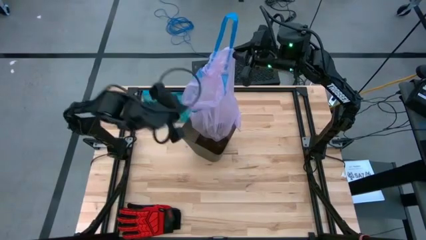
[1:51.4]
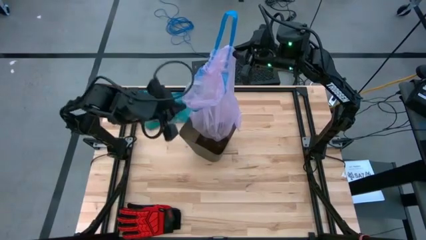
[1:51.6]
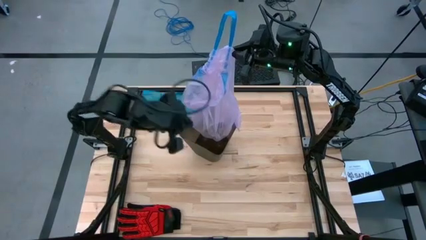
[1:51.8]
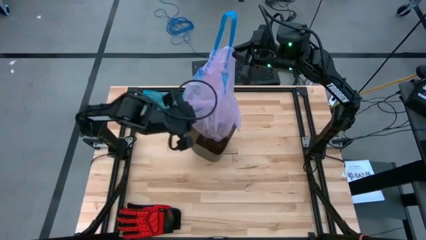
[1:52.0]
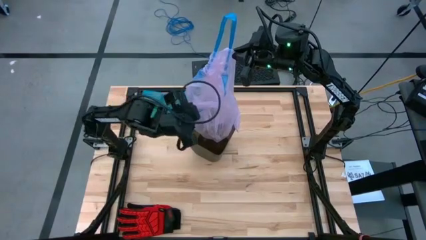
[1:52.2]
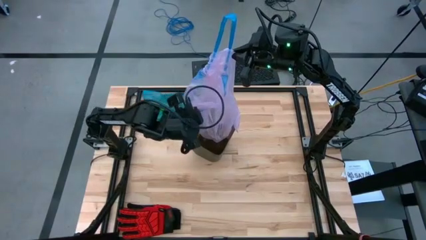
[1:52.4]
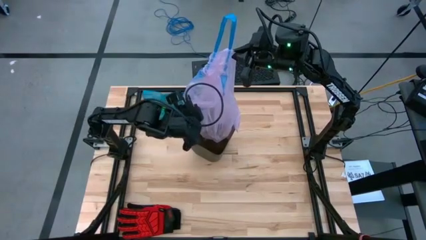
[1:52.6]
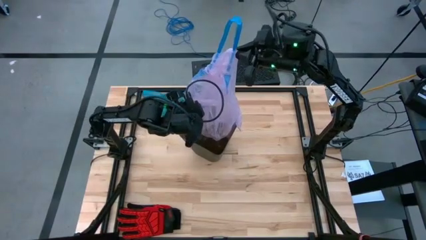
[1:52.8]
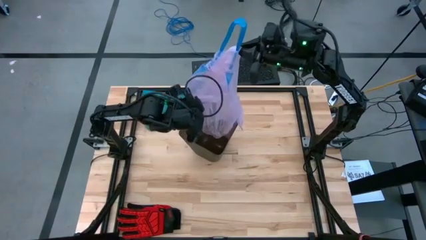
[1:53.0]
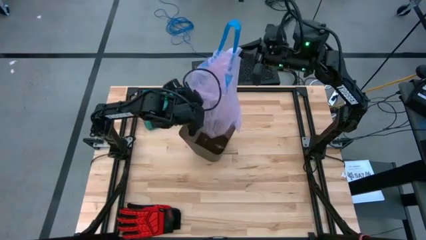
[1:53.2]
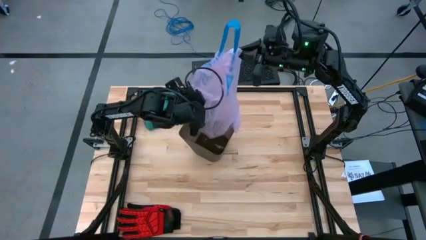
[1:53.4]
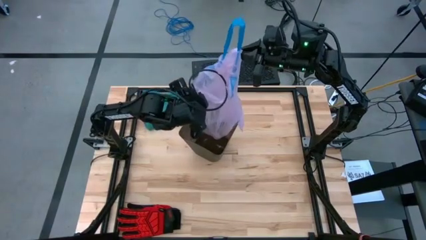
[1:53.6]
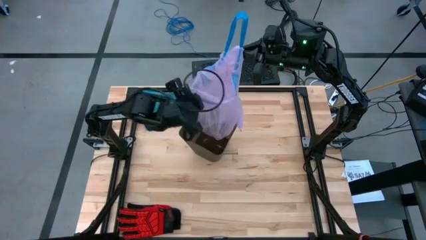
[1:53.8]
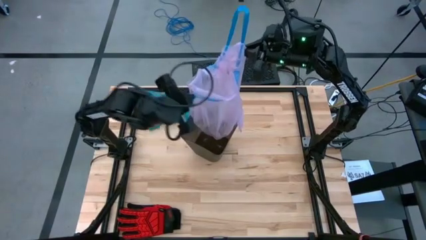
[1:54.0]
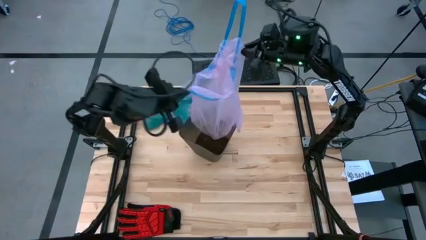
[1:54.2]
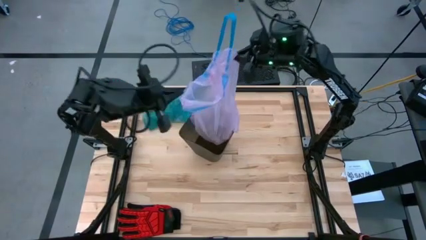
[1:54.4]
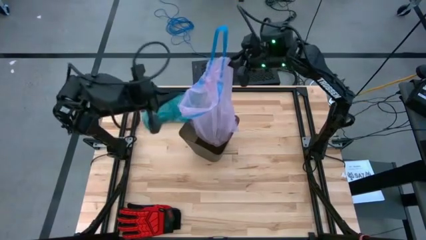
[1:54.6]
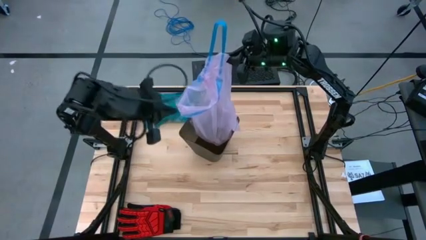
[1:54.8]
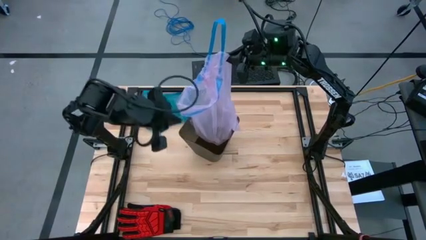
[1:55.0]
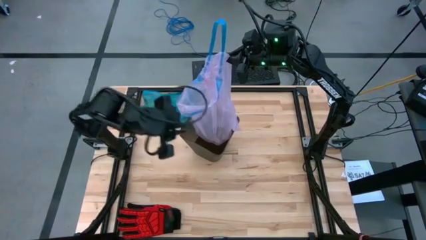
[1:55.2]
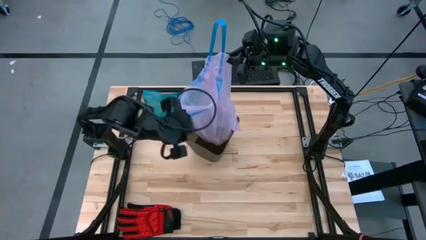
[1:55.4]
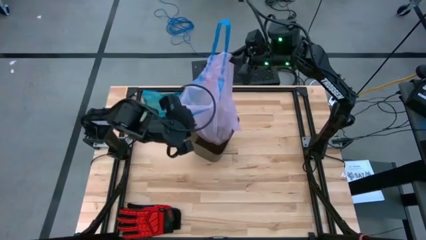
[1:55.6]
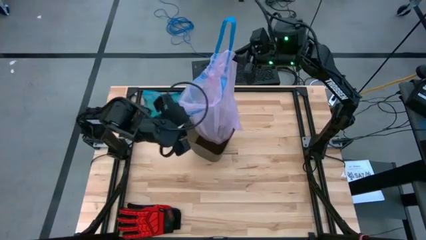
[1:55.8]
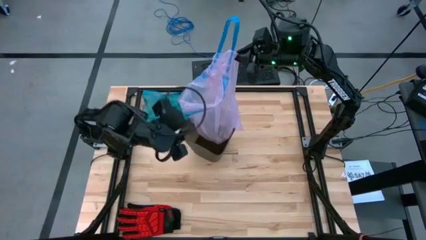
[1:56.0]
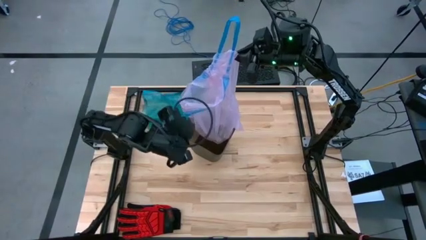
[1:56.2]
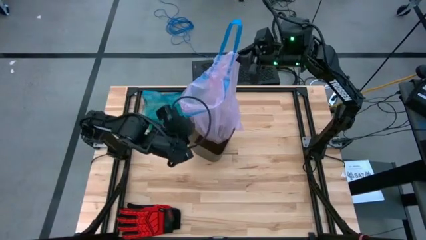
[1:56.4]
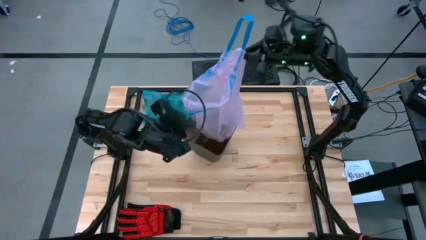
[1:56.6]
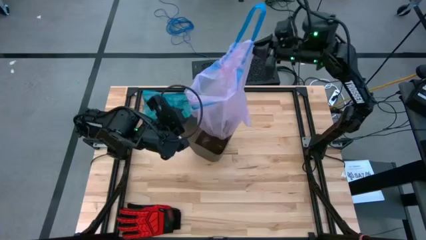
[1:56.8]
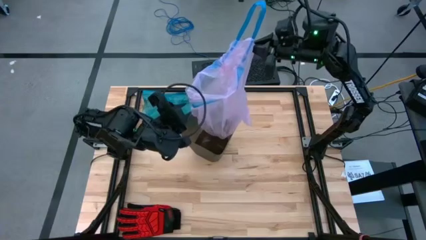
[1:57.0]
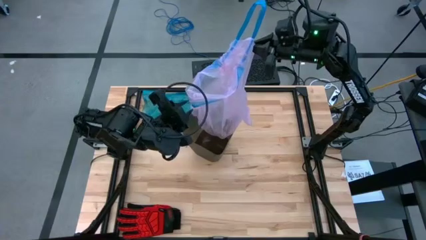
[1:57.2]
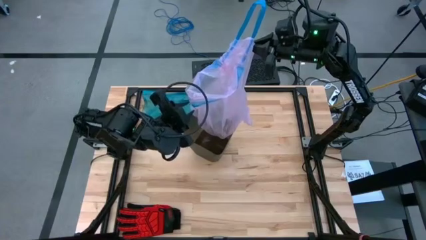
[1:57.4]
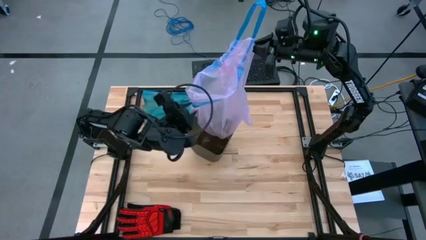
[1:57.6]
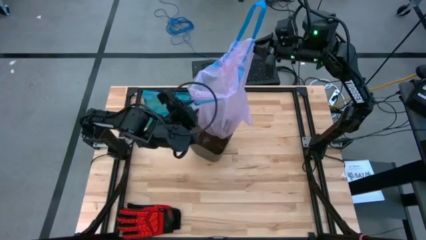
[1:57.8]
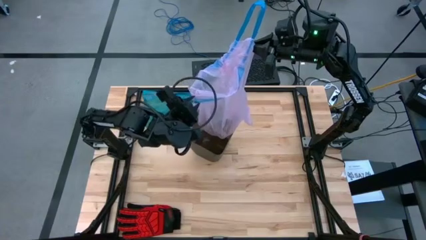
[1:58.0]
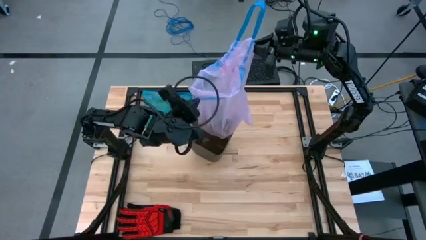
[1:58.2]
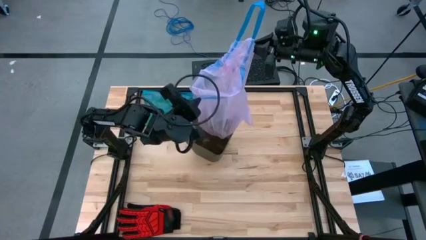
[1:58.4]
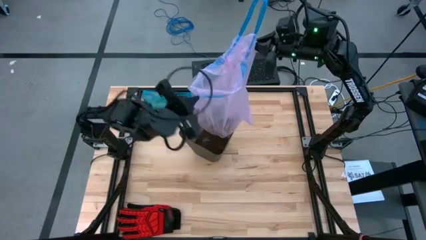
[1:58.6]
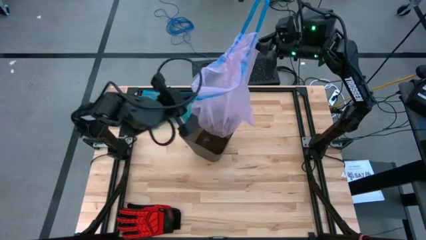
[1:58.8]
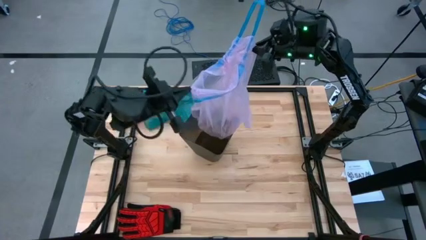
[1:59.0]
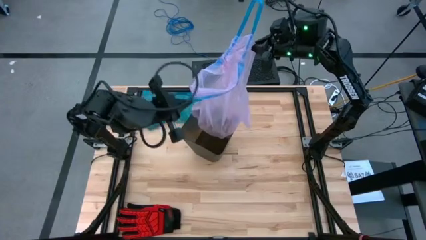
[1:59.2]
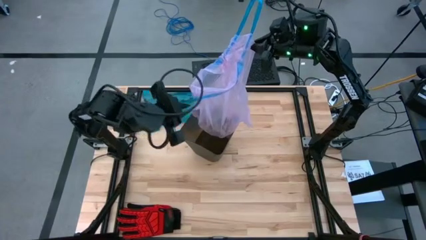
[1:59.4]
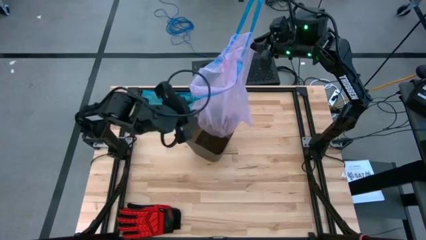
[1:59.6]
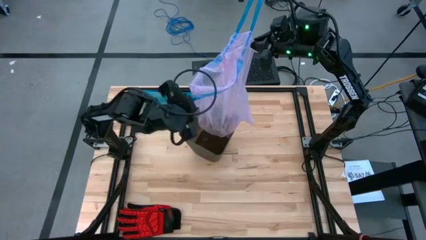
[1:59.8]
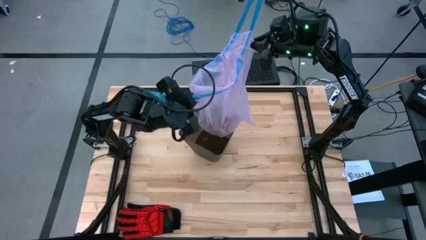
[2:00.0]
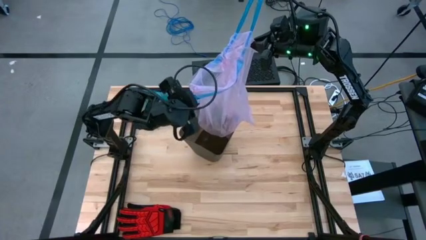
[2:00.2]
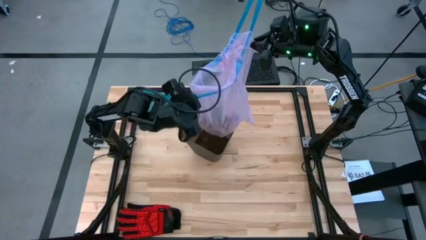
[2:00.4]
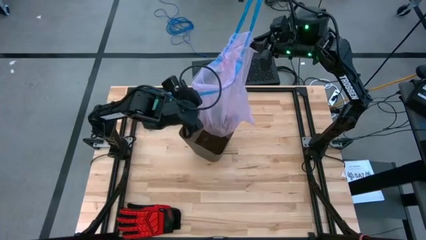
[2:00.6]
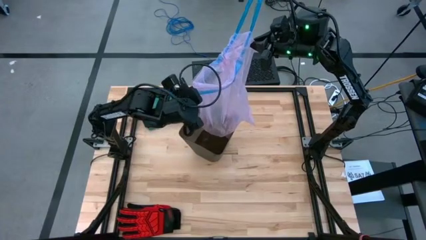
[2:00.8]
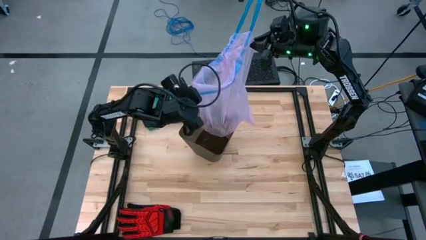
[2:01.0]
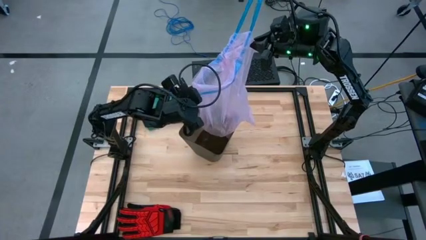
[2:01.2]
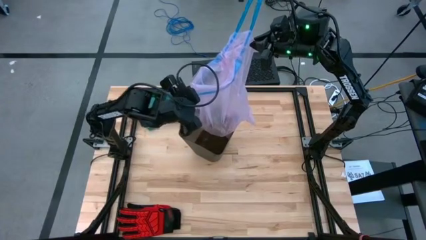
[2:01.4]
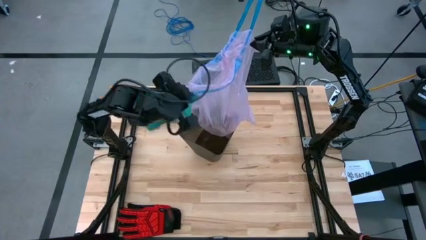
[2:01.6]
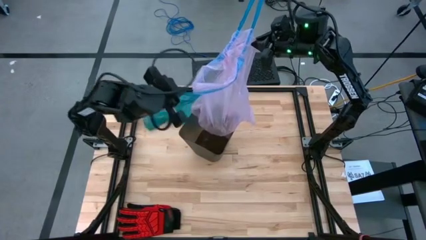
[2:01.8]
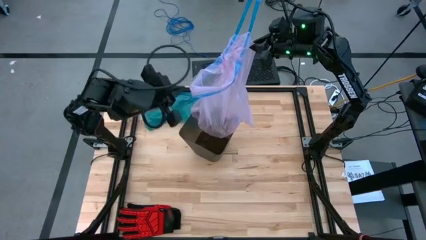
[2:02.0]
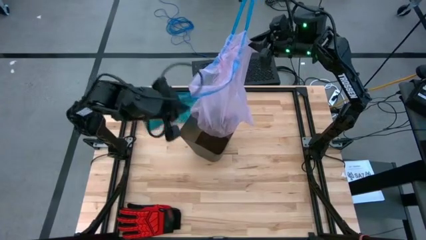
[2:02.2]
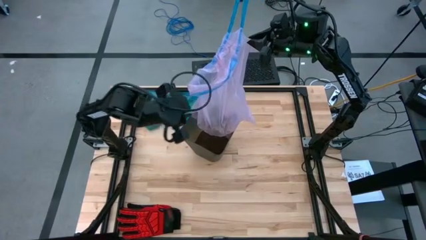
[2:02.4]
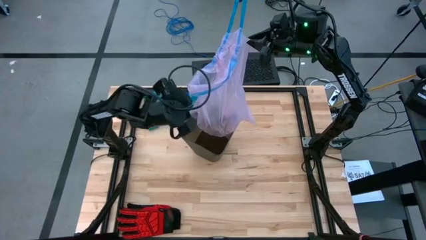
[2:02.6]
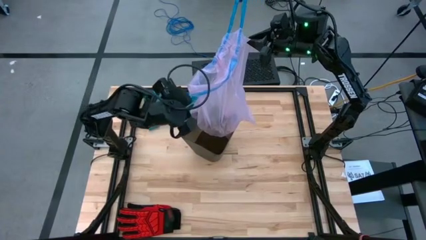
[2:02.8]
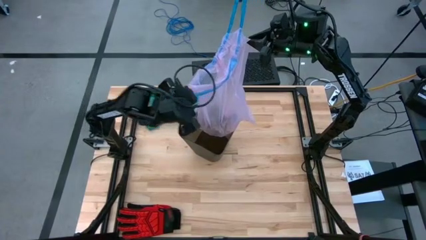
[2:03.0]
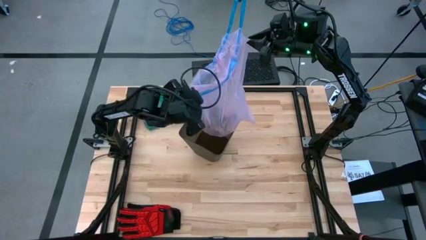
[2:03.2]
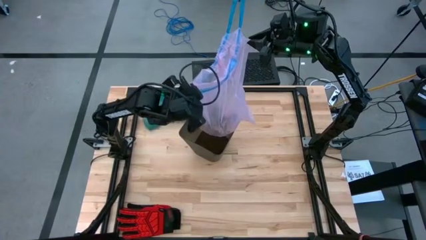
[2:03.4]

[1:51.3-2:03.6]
Task: place trash/remove bag and relplace
Remove the pink trash bag from the black trash bin
